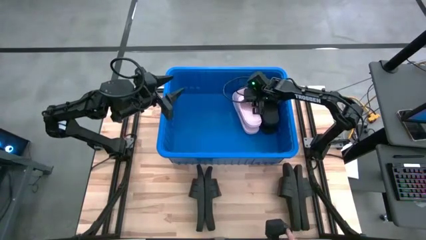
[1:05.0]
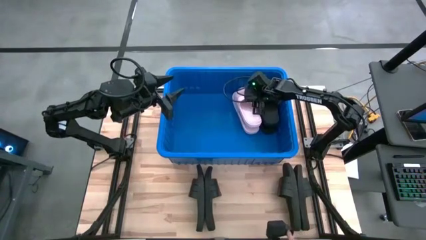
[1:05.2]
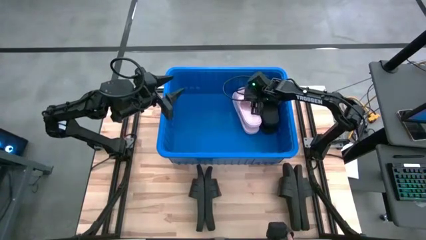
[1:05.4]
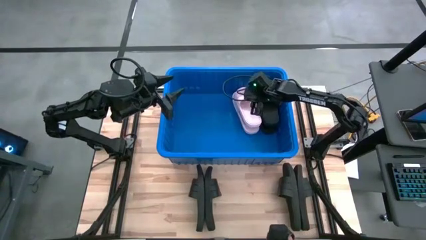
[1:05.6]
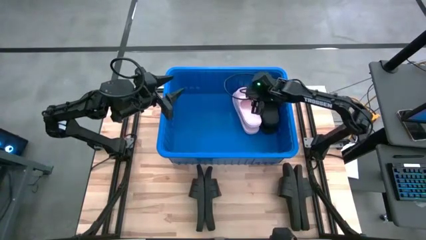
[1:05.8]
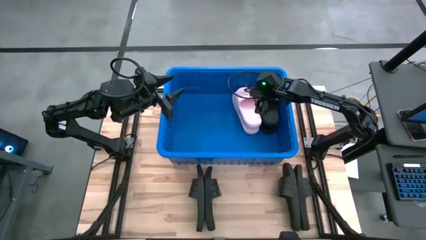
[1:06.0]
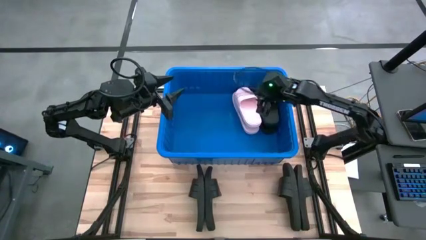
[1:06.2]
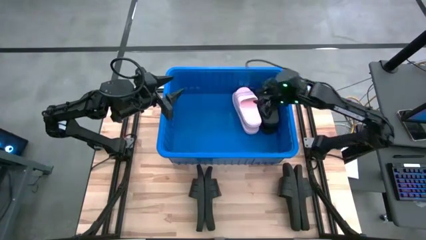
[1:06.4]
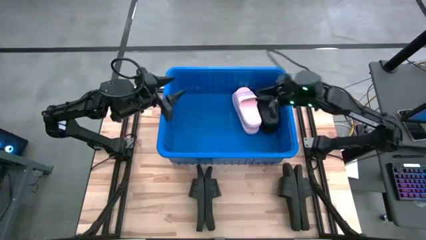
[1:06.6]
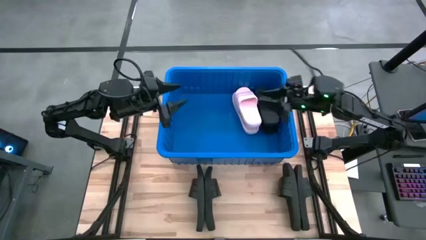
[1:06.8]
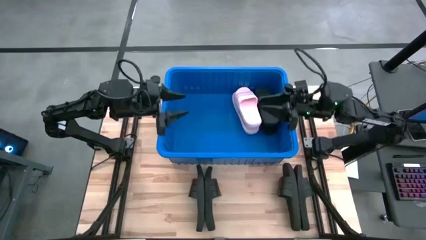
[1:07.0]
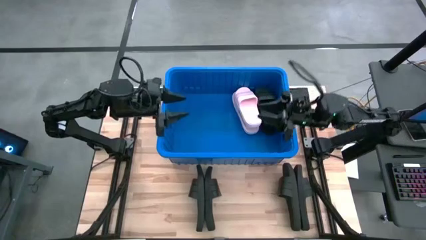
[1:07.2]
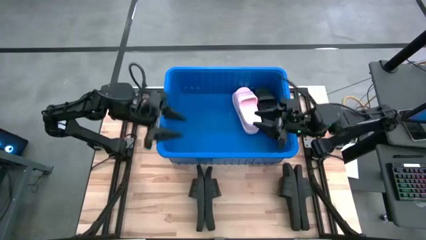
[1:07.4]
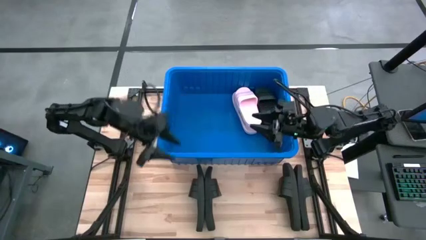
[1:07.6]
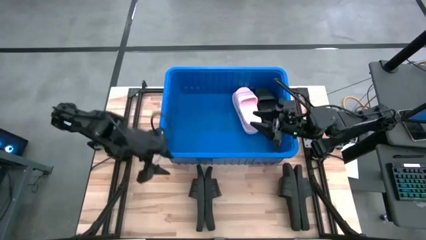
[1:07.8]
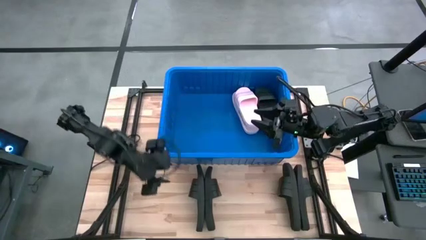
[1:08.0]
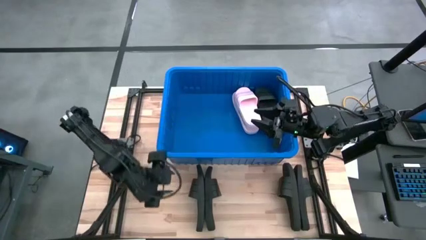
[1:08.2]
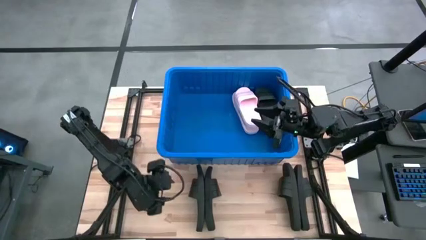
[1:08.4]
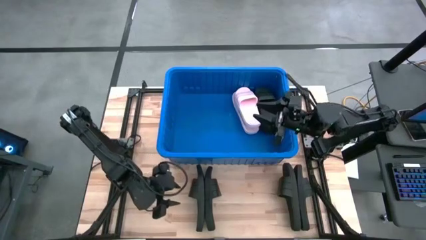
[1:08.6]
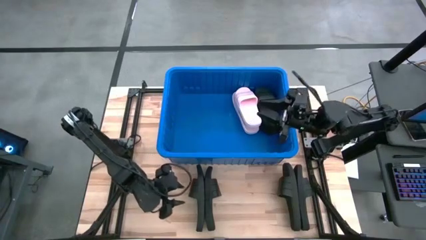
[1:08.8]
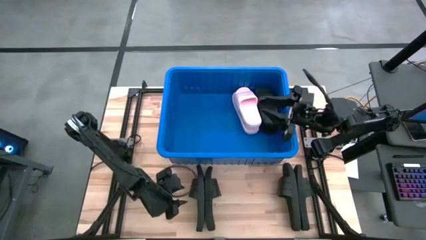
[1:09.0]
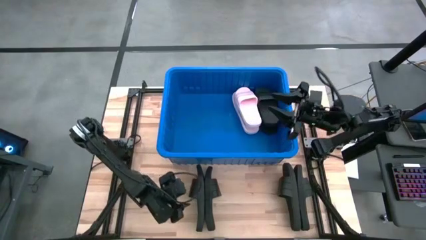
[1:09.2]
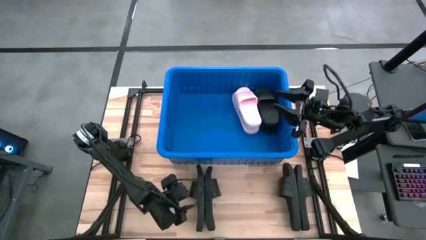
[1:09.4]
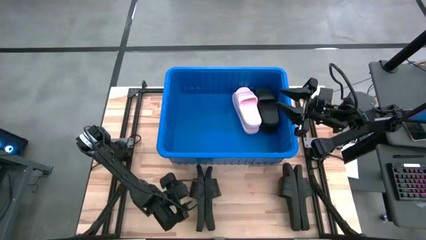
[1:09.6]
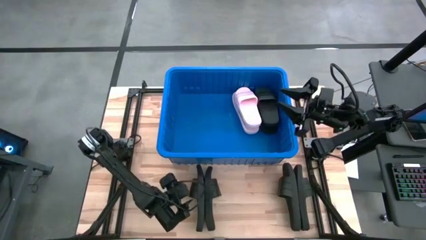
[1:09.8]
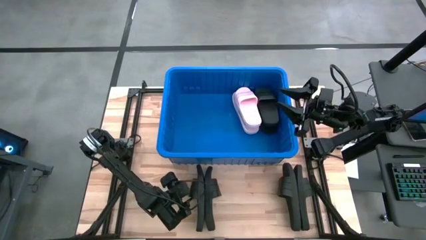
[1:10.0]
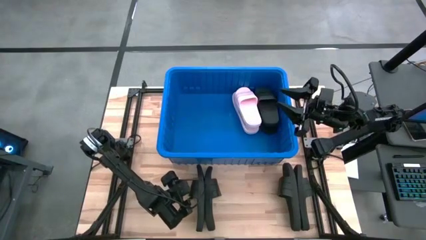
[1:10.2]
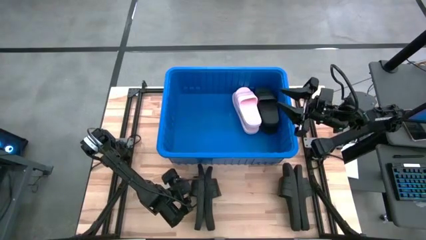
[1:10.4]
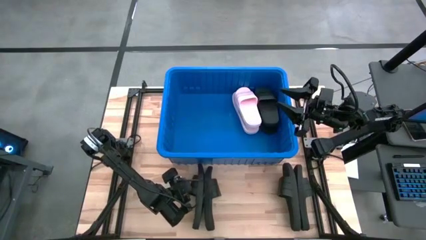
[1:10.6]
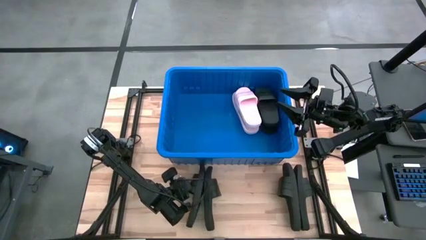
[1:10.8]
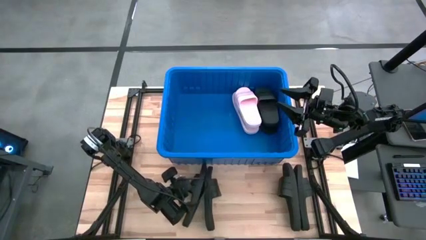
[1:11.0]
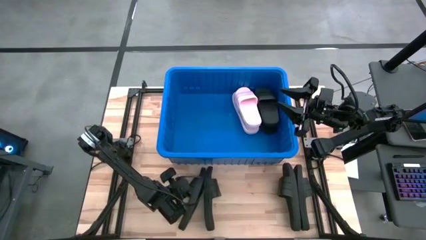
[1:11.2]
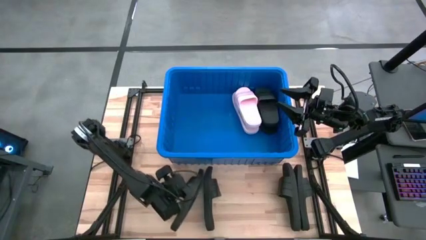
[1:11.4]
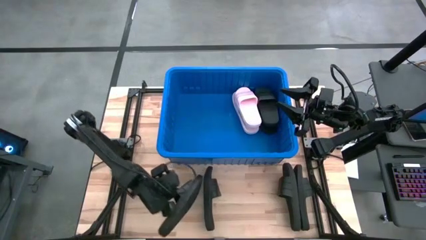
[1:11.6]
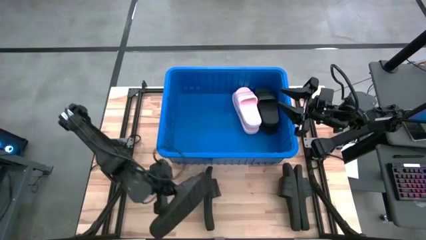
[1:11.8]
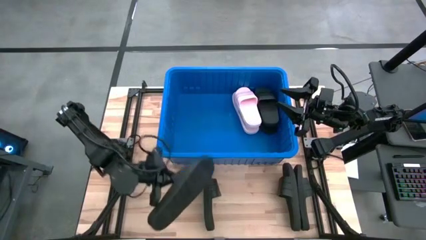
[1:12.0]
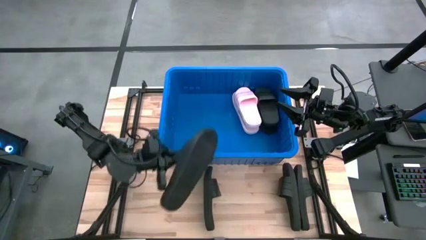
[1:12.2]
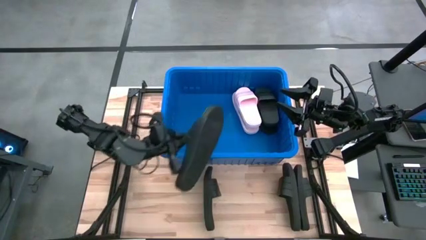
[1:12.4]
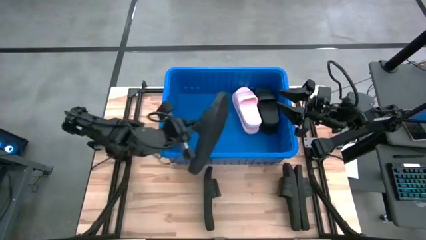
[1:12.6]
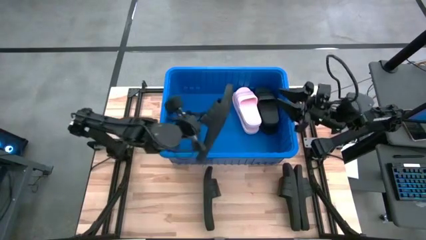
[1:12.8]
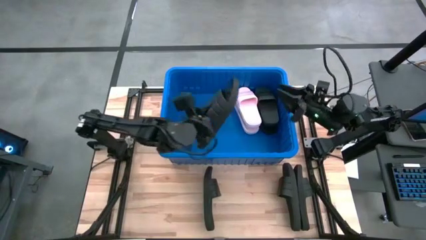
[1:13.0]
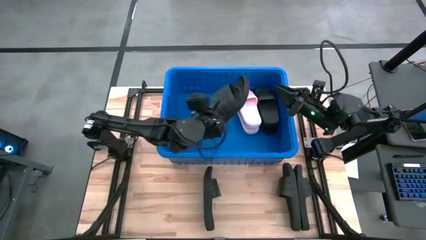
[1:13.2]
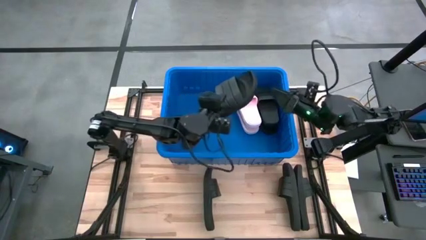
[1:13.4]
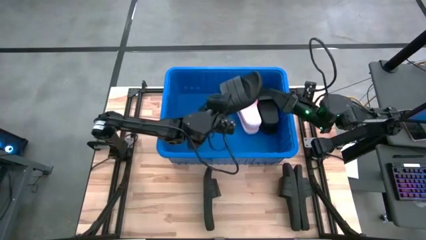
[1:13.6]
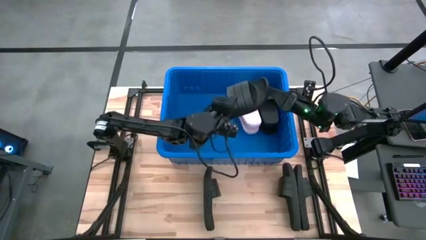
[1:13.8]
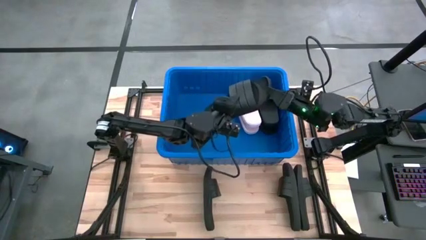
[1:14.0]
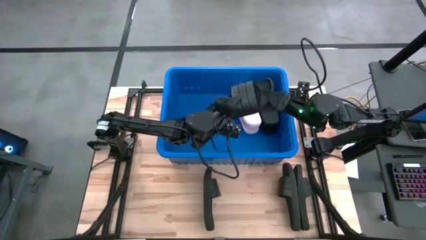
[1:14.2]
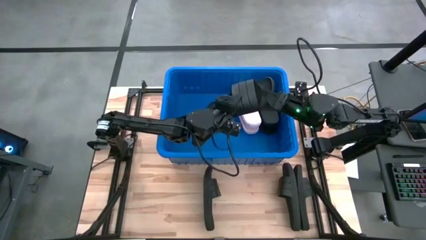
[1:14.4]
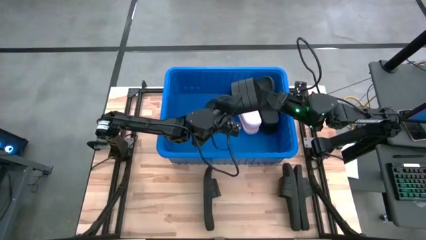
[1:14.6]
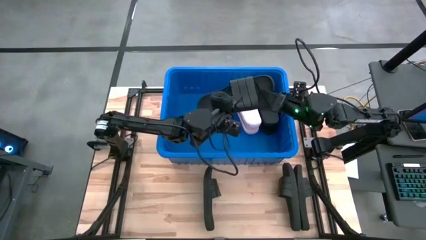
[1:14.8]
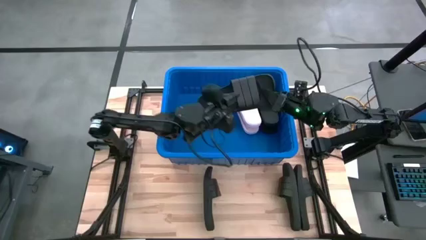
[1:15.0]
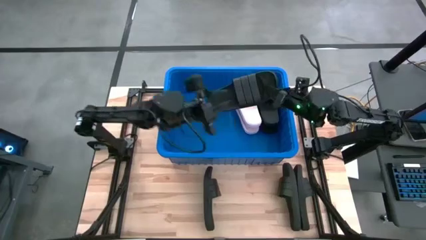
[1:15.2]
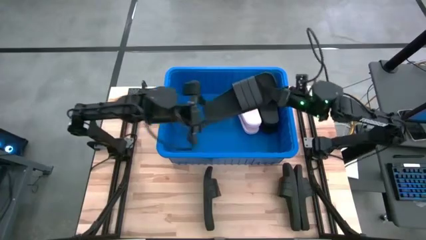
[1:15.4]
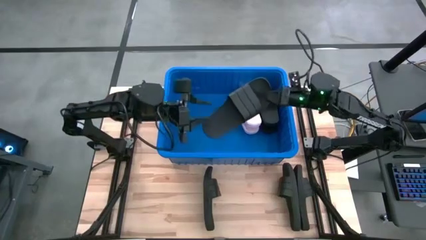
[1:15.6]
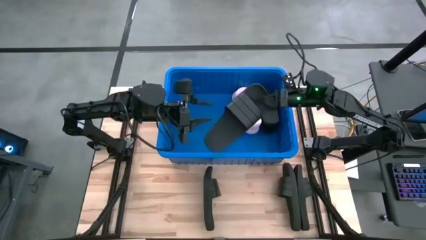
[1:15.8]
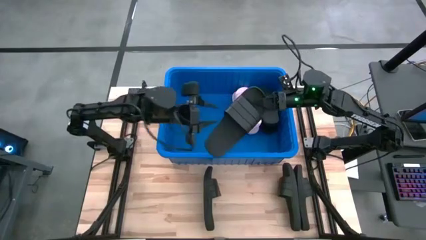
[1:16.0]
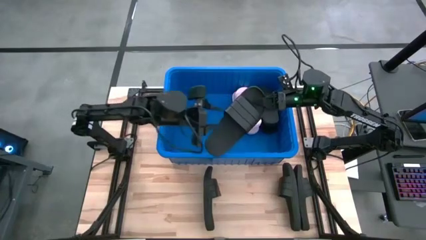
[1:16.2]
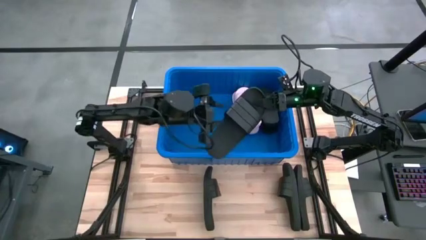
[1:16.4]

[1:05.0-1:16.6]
Task: Pick and place slides into bin
Put the black slide into the blue bin
